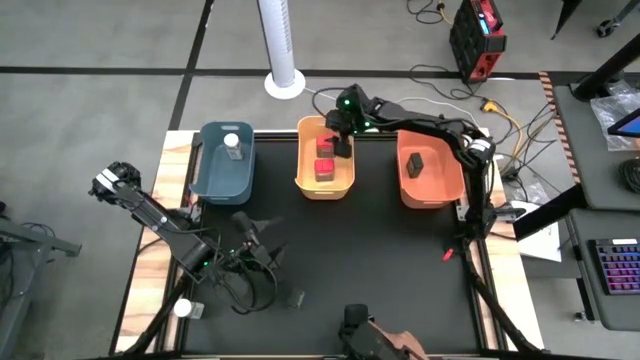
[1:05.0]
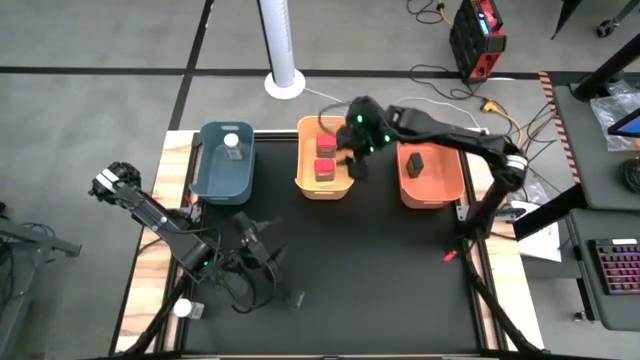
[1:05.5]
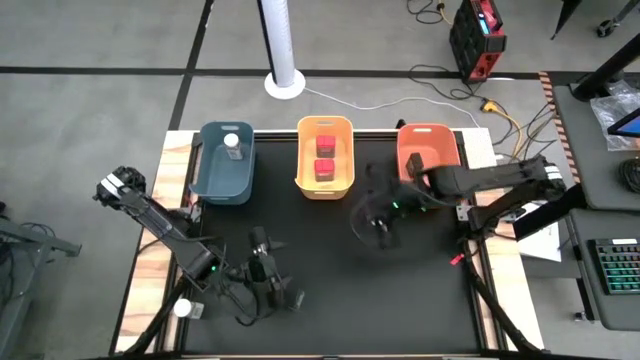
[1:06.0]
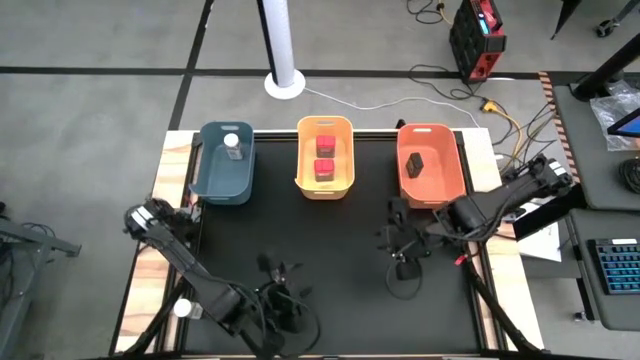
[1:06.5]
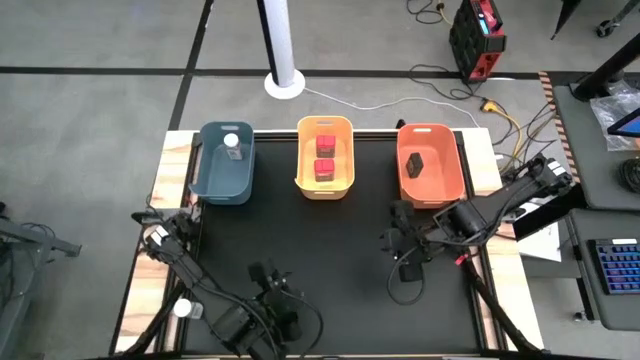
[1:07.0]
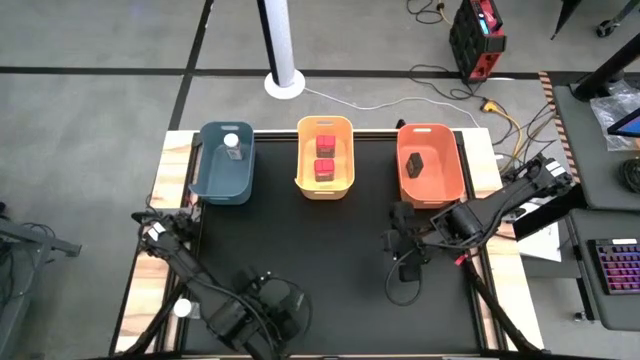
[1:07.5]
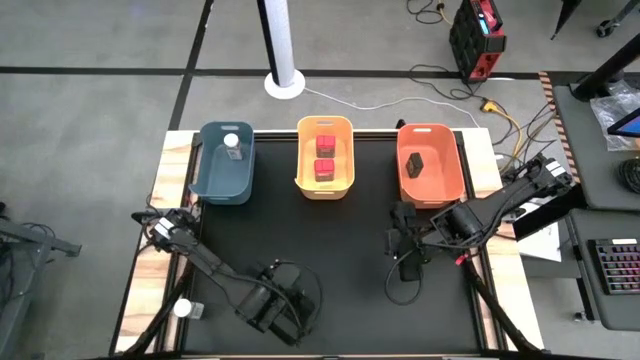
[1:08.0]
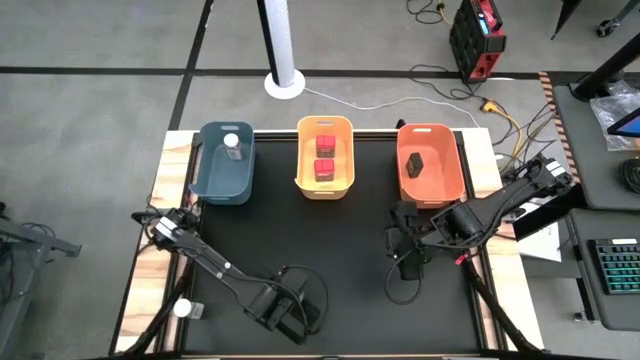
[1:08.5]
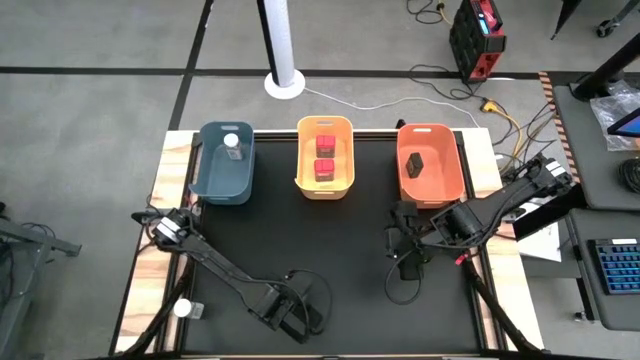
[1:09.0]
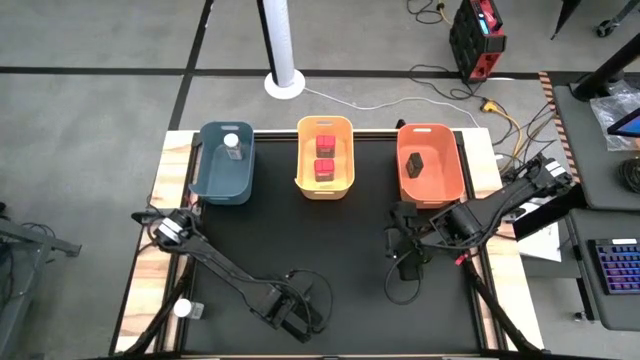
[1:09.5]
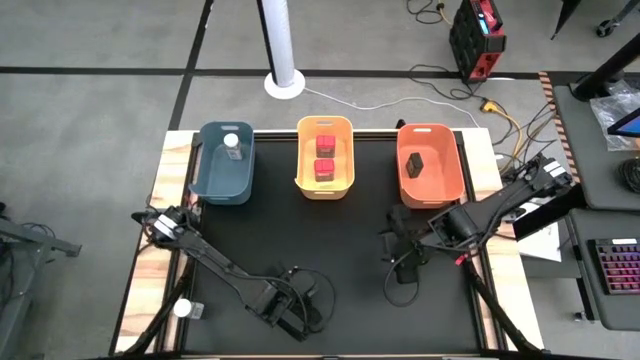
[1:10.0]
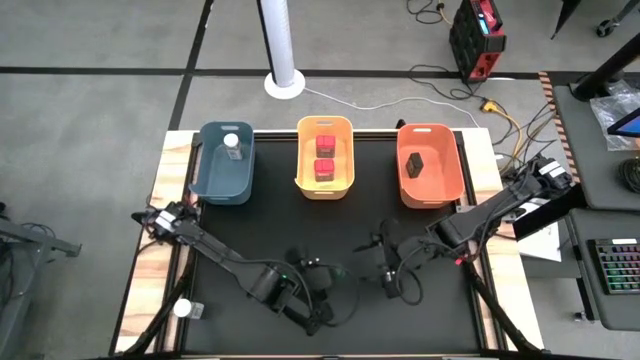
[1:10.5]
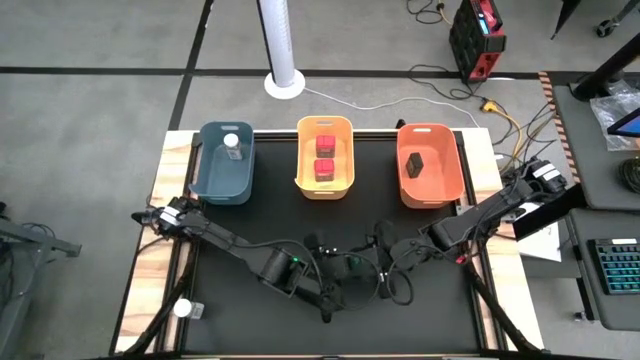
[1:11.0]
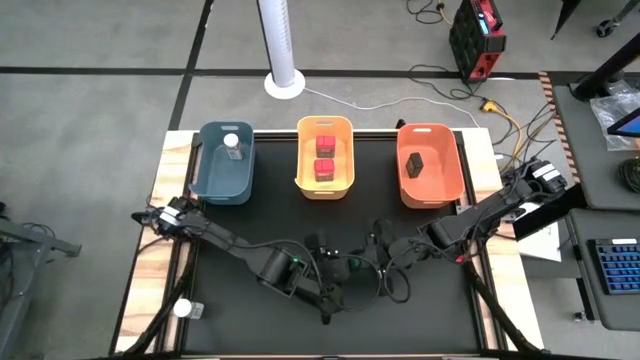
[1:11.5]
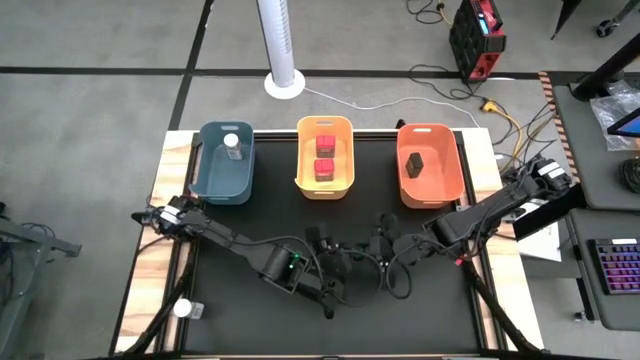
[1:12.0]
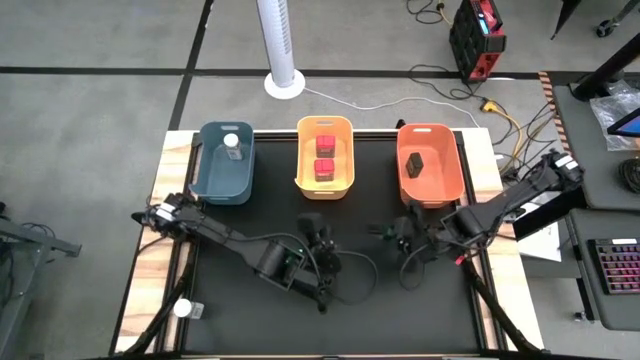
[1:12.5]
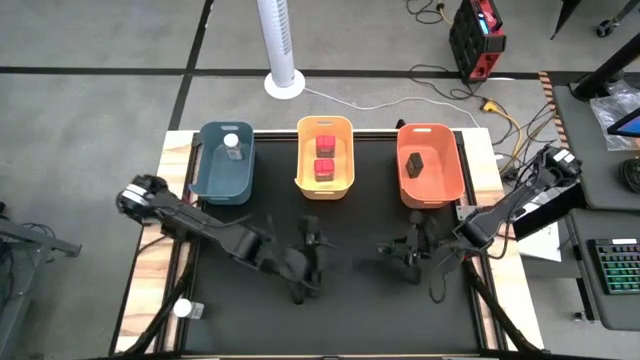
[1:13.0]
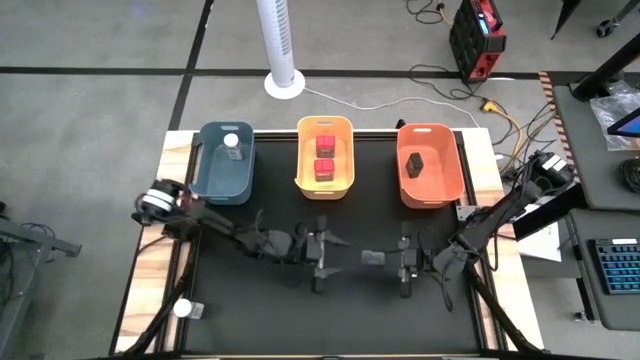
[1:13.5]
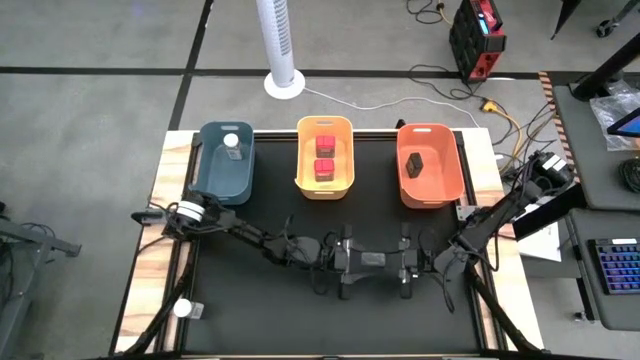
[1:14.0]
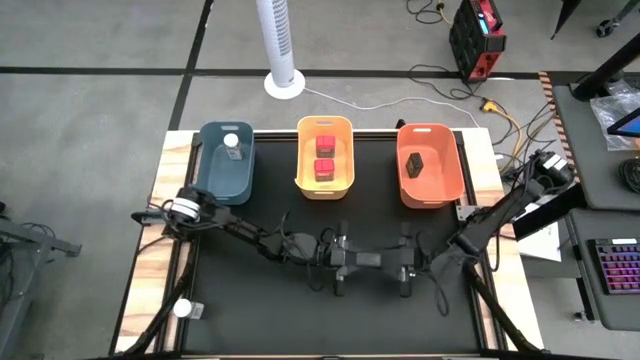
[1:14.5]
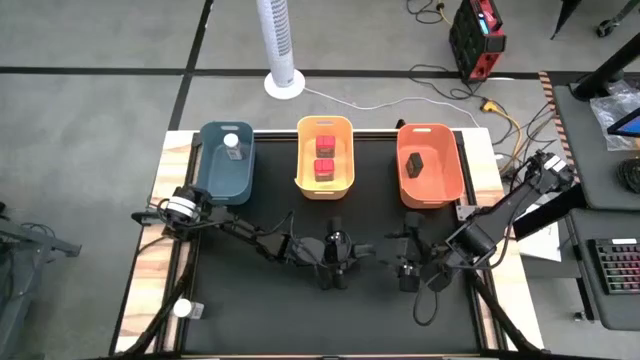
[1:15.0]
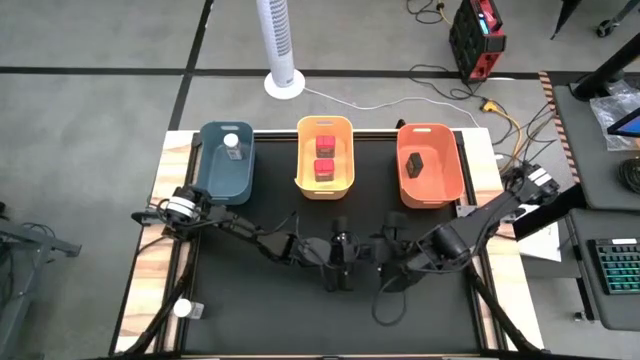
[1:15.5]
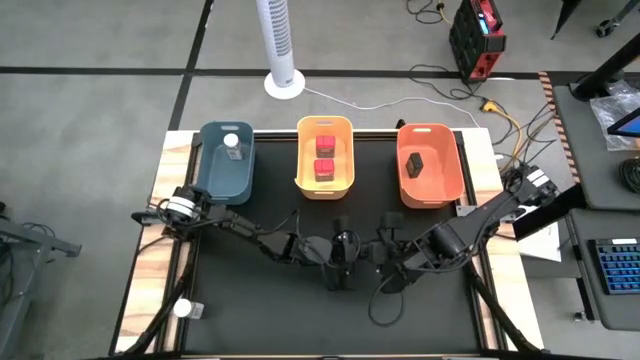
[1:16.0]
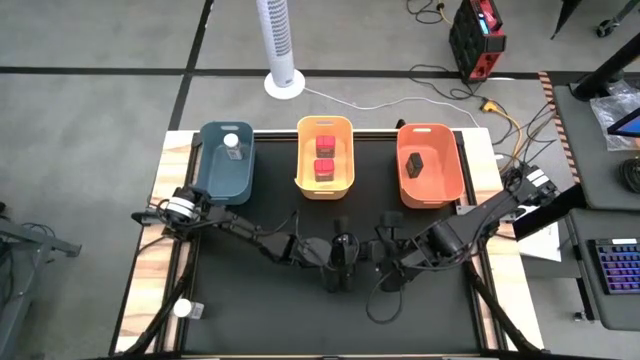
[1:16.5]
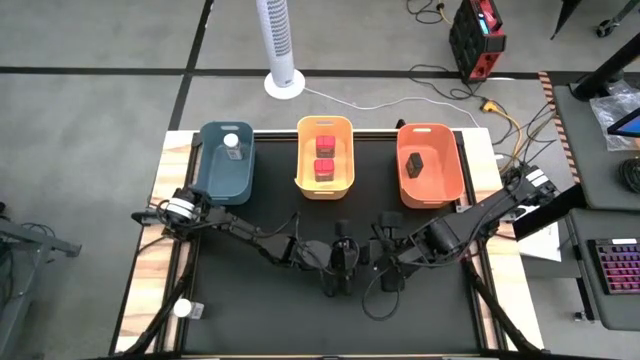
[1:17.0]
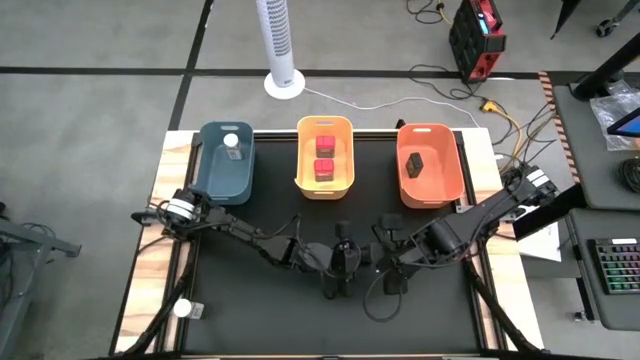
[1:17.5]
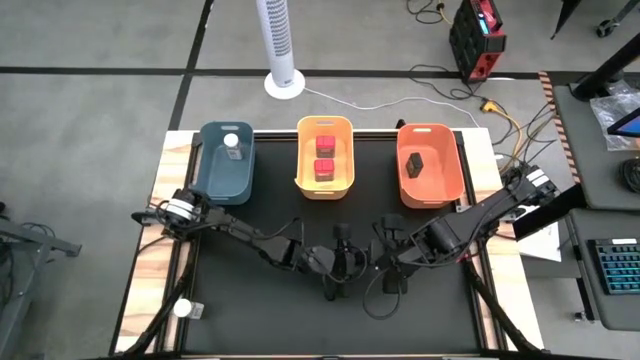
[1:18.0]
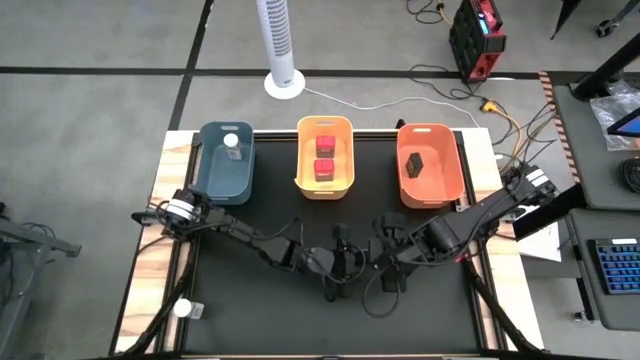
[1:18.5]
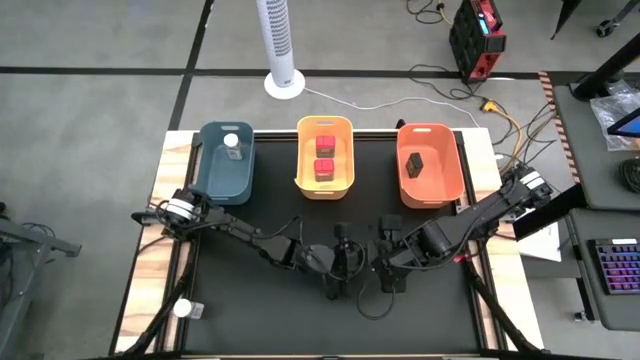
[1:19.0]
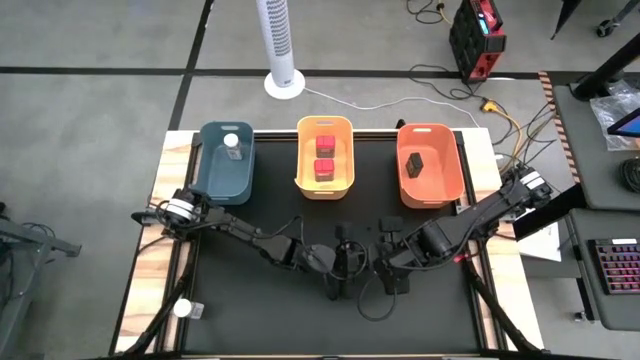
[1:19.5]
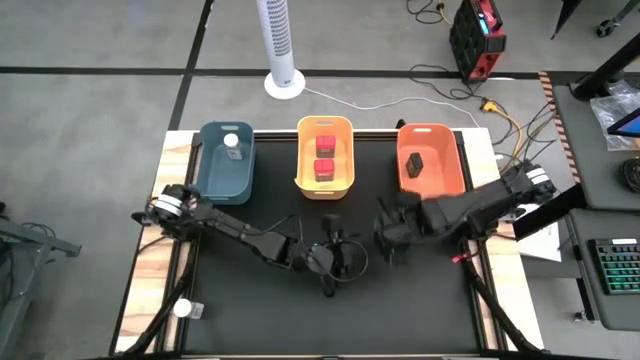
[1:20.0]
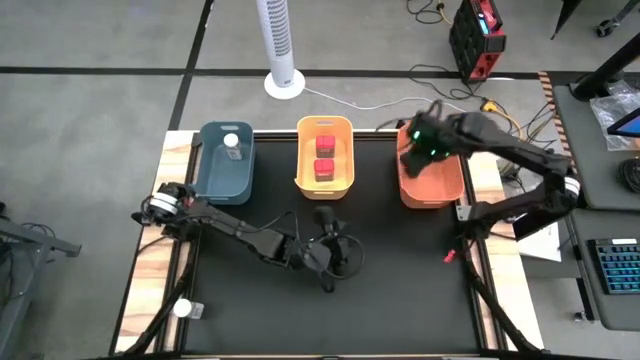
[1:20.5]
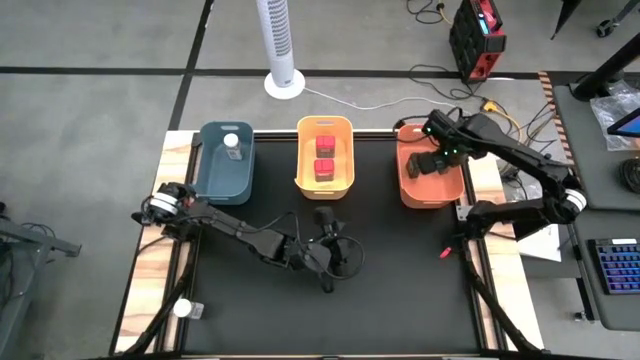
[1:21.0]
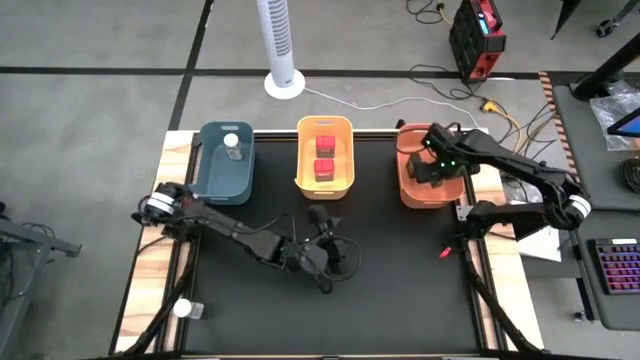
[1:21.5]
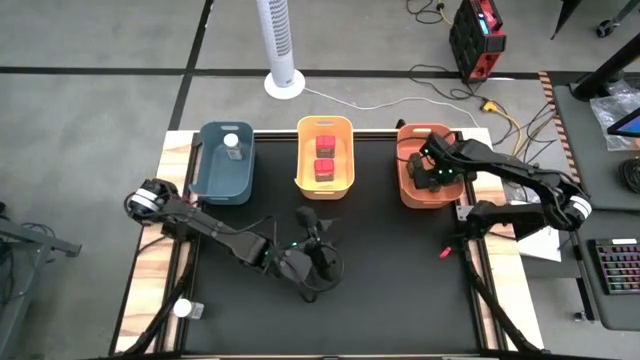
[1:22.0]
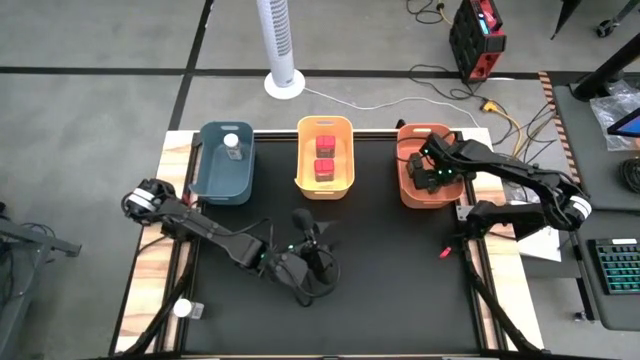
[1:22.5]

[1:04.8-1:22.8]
Task: Sort spices by type
Put the black seasoning can into the orange bin

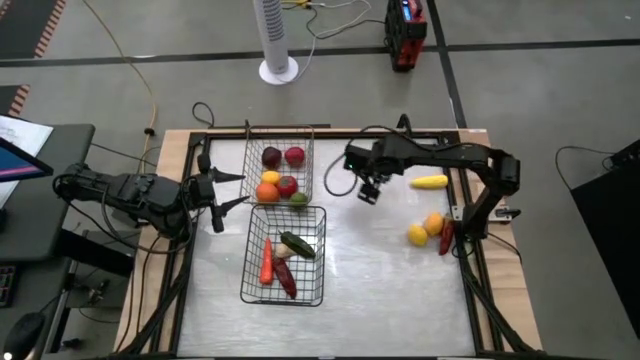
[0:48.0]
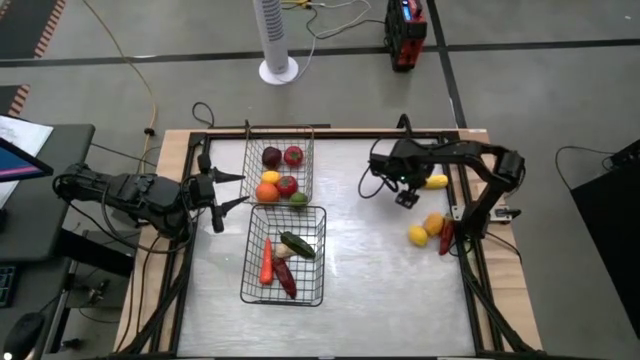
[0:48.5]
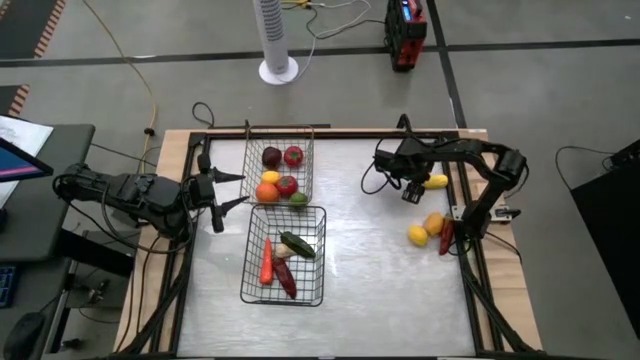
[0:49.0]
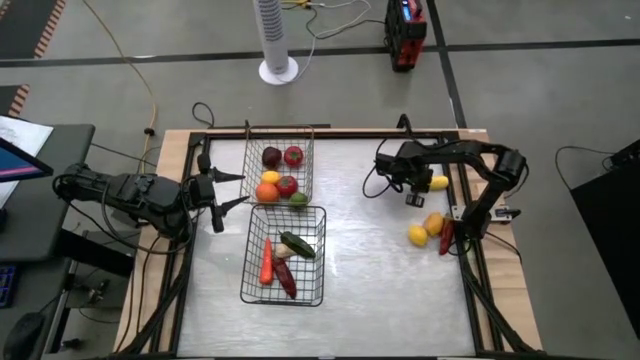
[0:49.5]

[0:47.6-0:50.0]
Task: Sort produce into baskets
Put the corn into the black wire basket

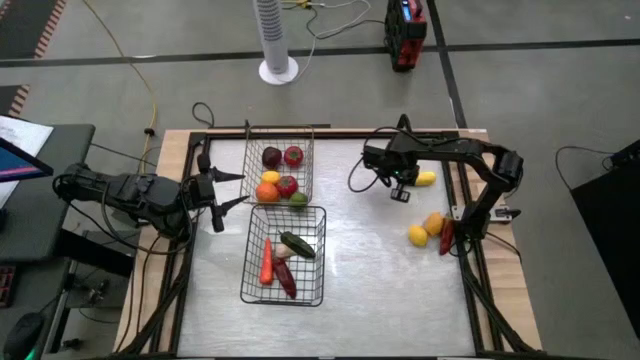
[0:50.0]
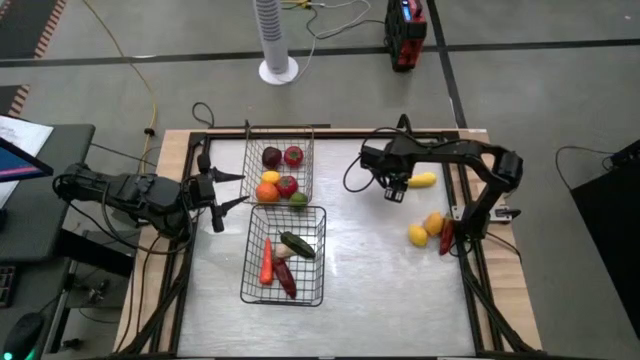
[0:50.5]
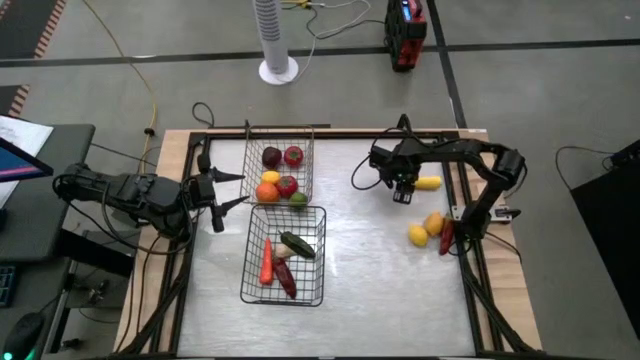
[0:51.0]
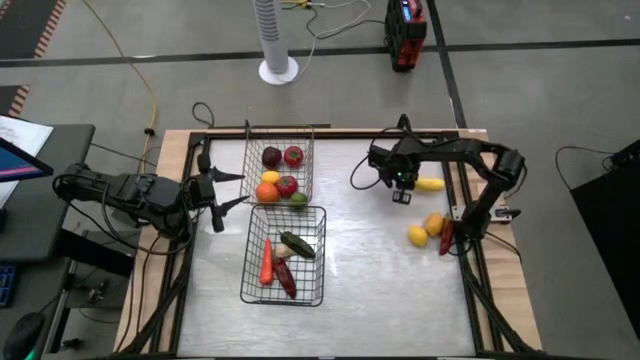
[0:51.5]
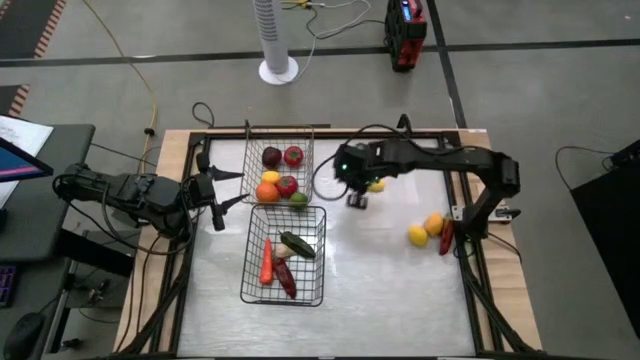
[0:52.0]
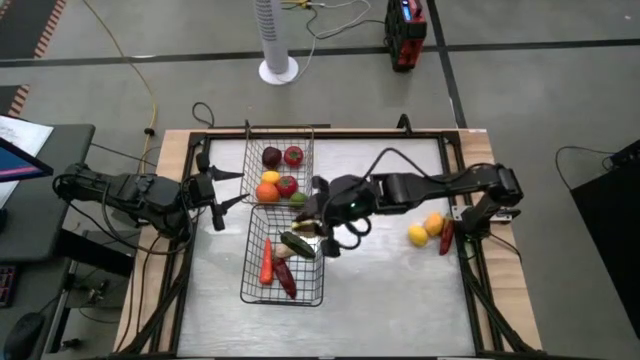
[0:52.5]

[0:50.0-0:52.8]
Put the corn into the black wire basket
